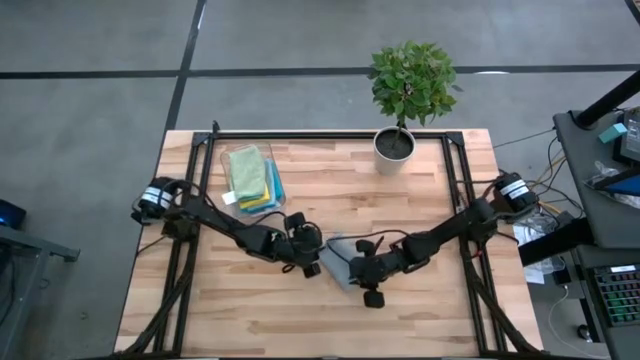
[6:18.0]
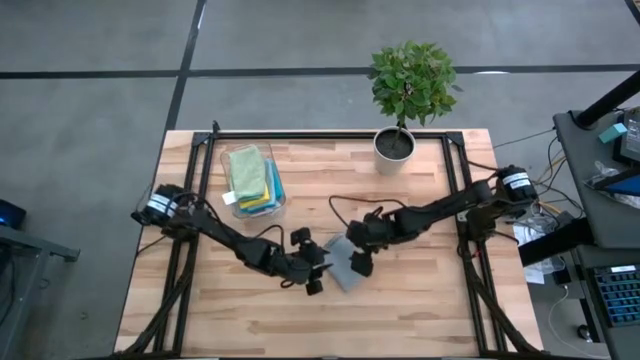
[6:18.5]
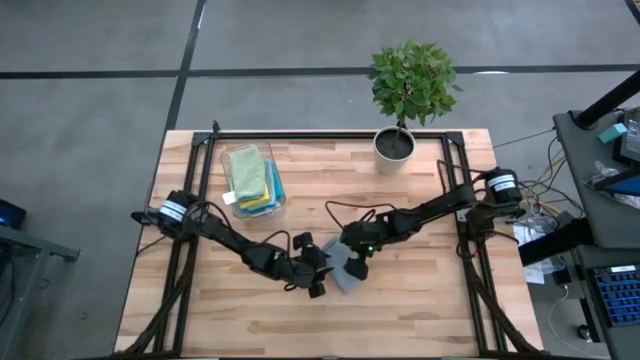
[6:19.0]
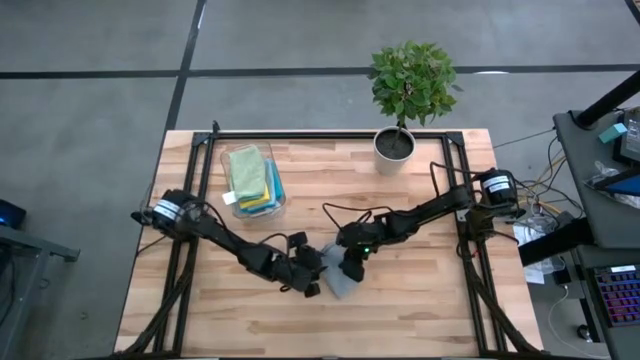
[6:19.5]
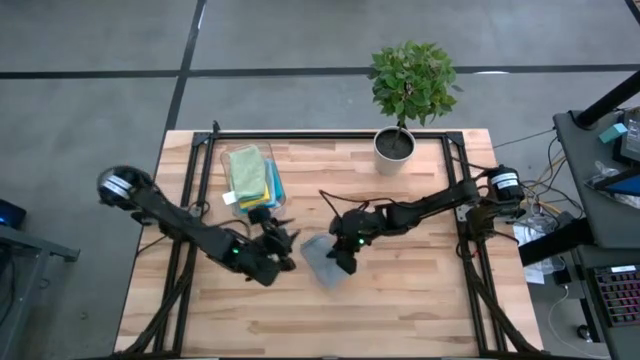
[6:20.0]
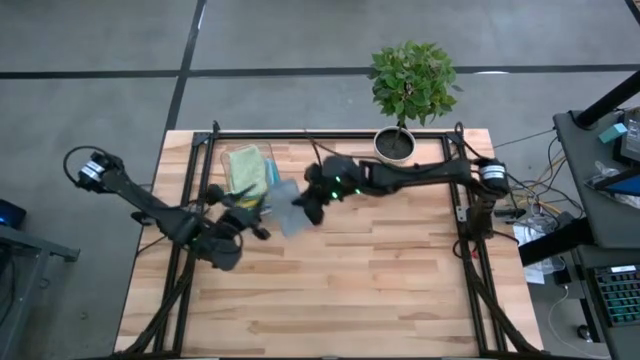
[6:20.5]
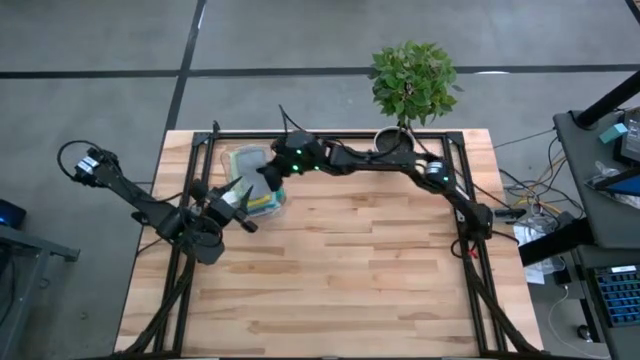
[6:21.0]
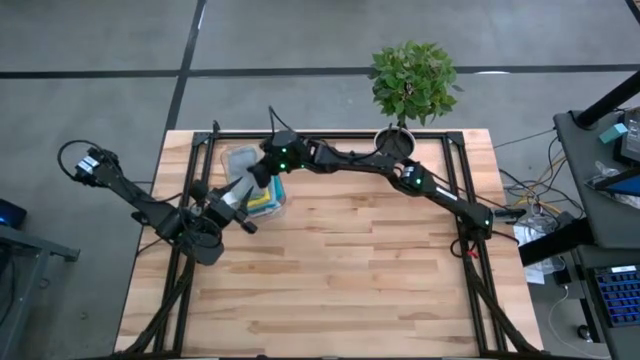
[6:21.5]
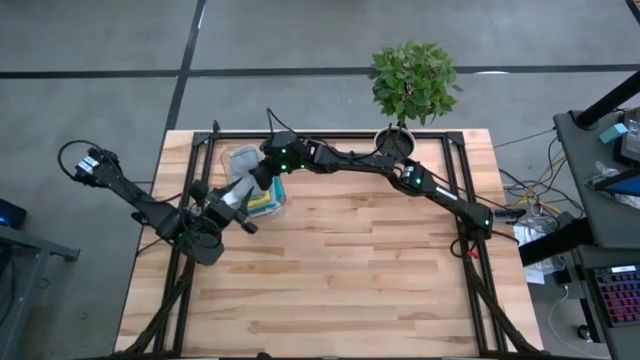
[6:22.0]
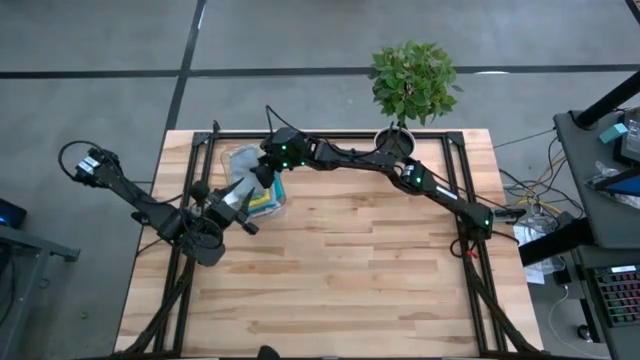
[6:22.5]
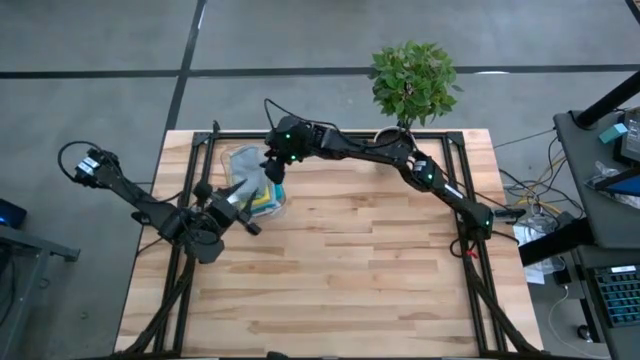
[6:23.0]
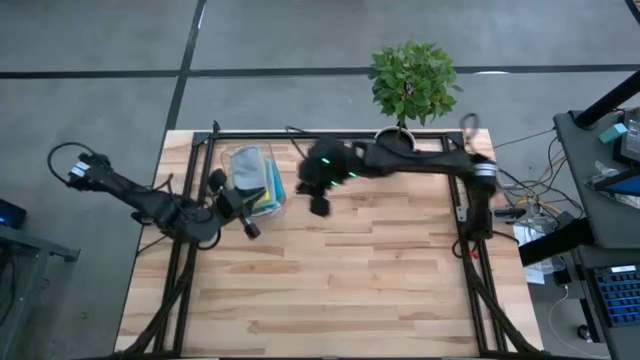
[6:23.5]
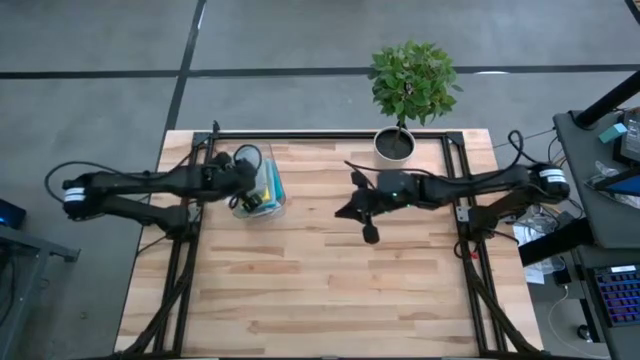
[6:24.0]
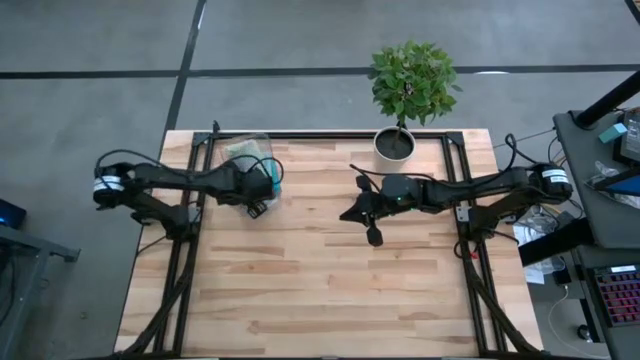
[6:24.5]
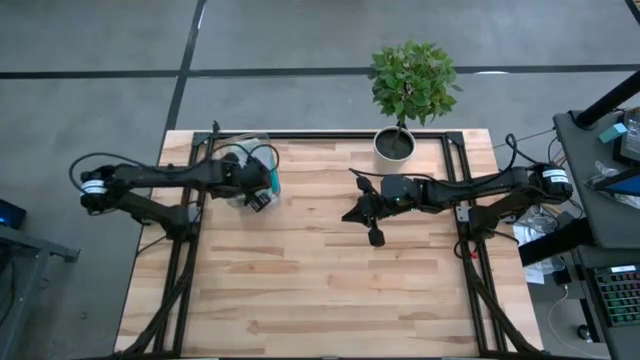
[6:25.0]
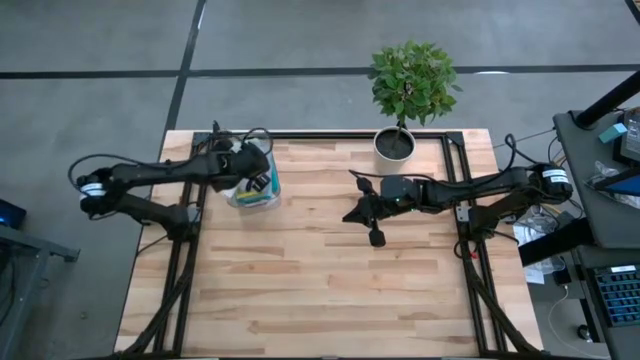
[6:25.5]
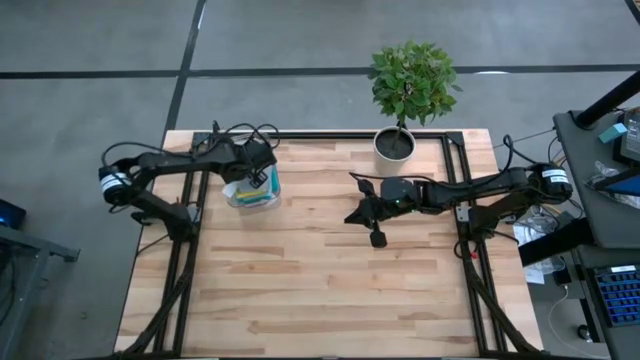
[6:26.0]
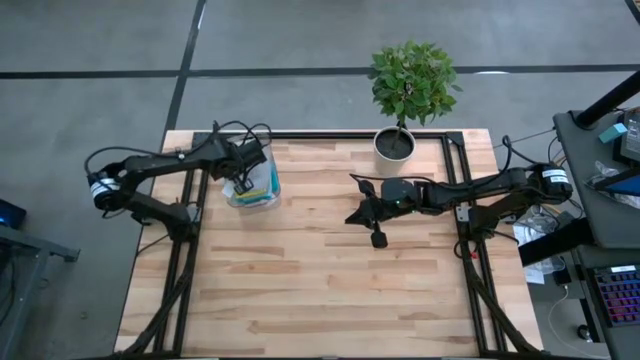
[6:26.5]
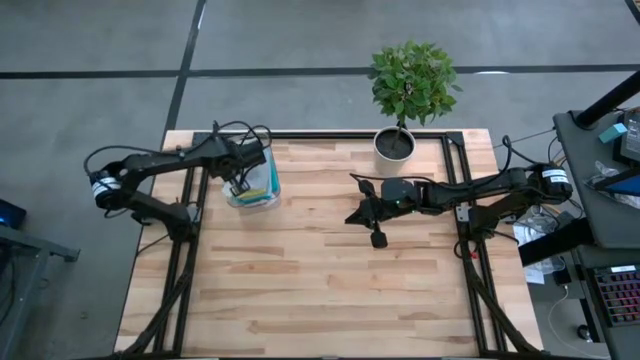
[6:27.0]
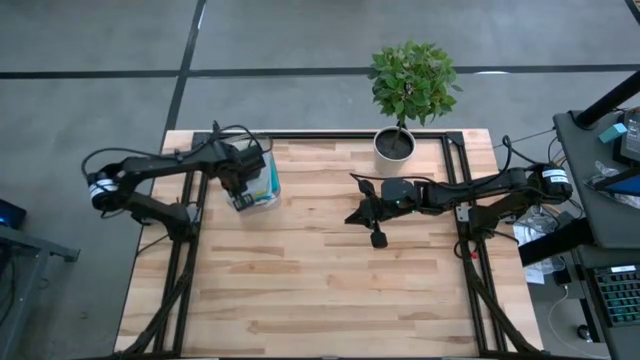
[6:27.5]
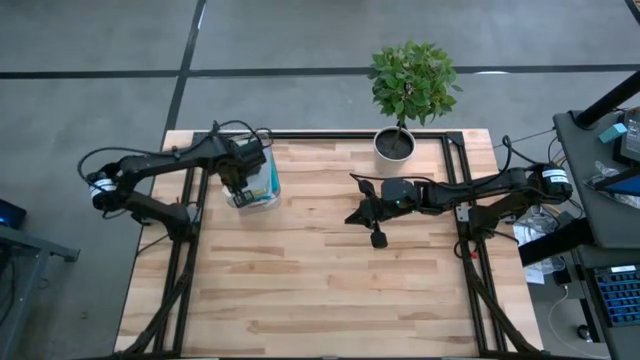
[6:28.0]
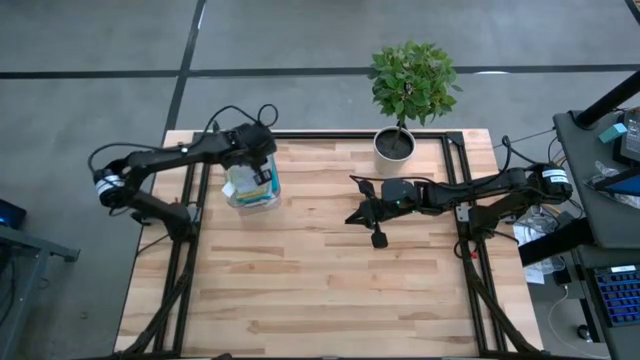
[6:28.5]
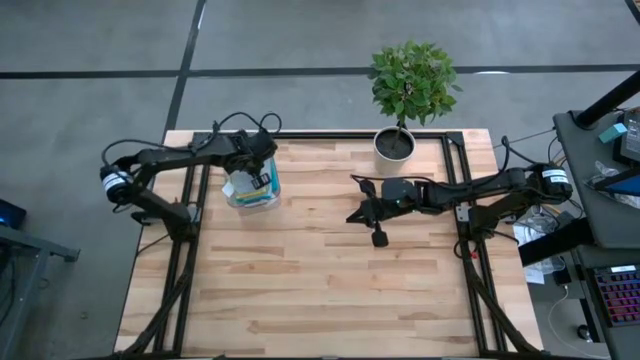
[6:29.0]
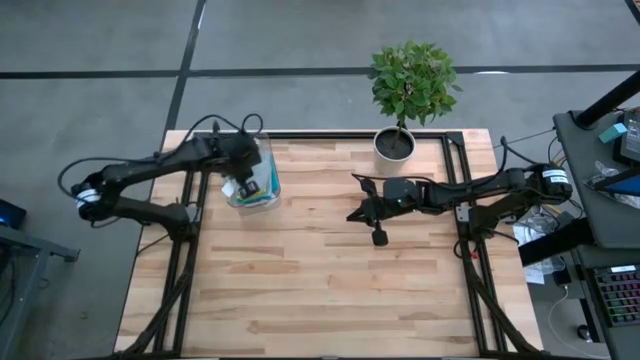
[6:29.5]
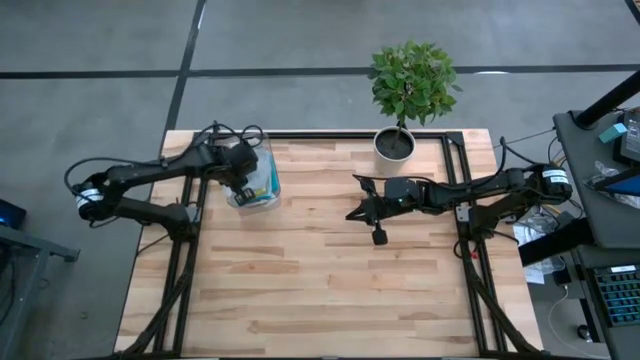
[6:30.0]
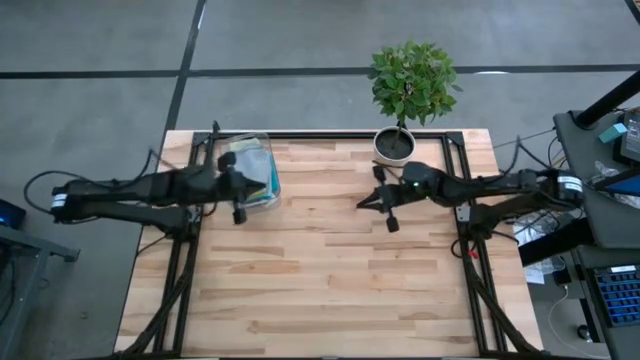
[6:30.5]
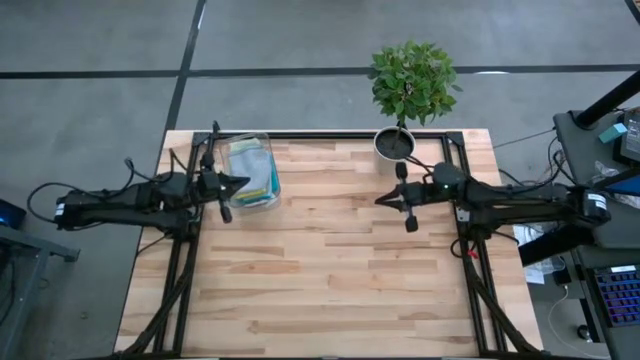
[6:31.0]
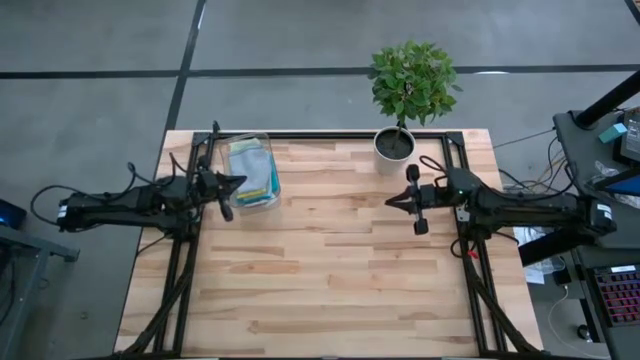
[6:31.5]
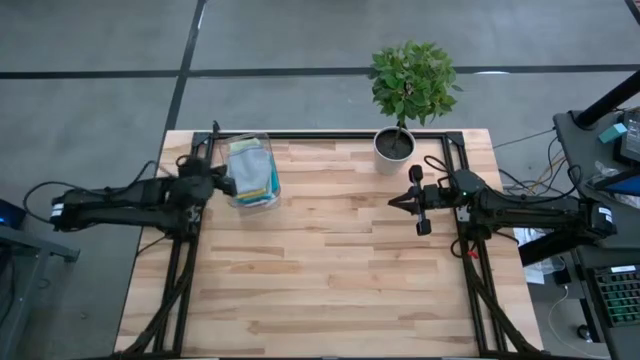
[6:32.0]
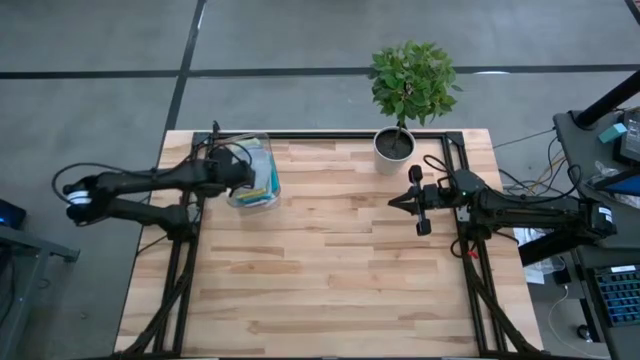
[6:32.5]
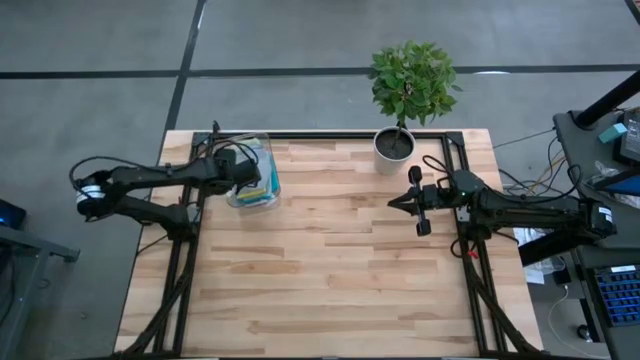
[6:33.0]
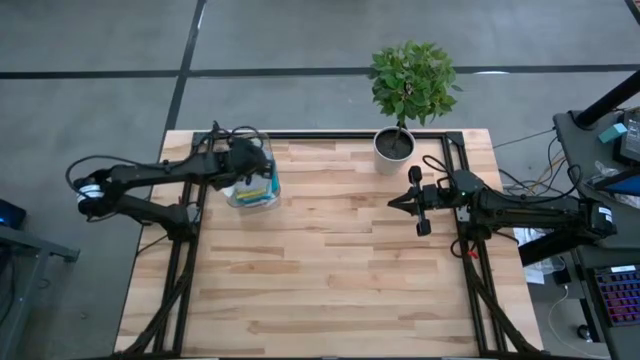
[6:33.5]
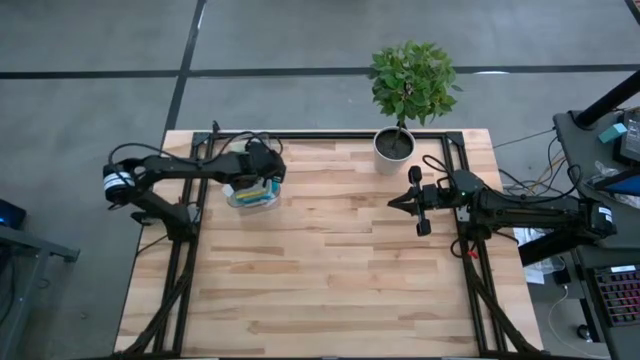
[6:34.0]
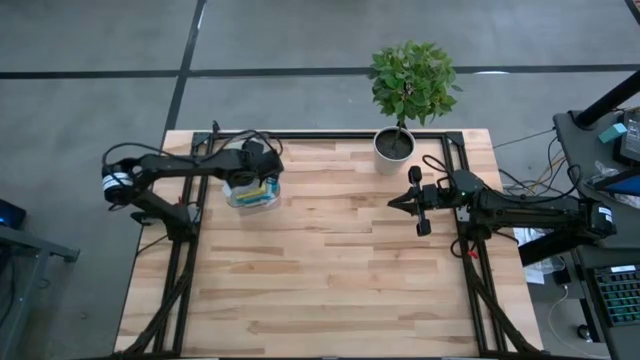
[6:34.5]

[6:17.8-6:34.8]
Task: Fold microfiber towels
Stack the folded gray microfiber towel on top of the light green microfiber towel on the bin

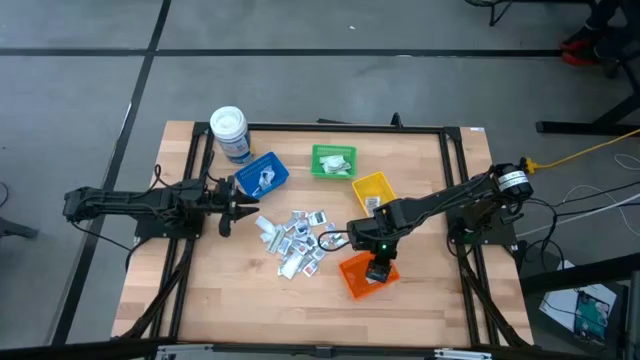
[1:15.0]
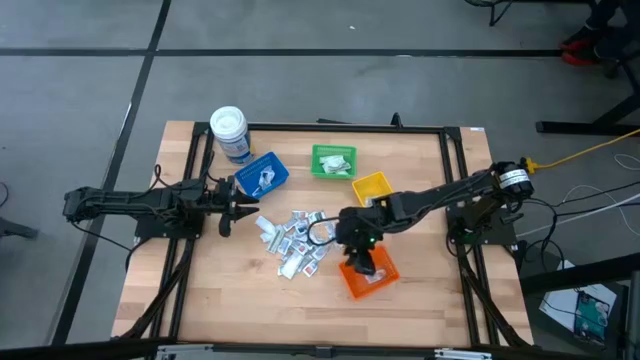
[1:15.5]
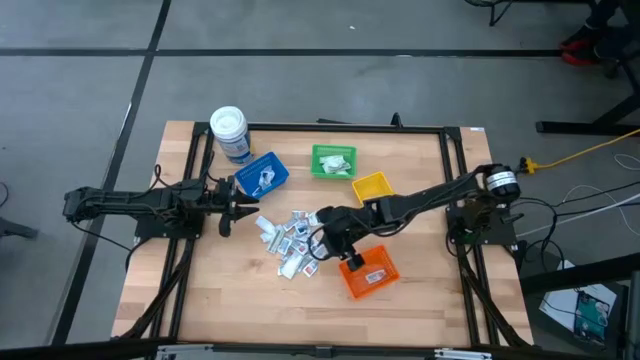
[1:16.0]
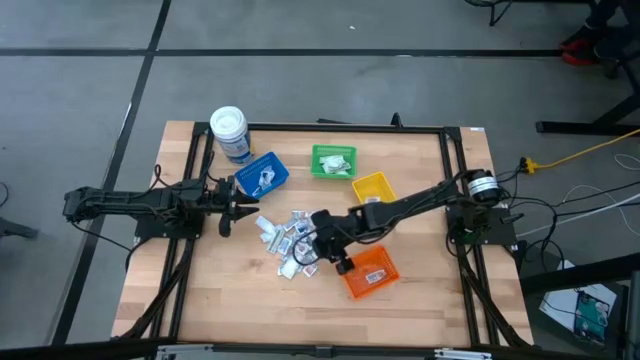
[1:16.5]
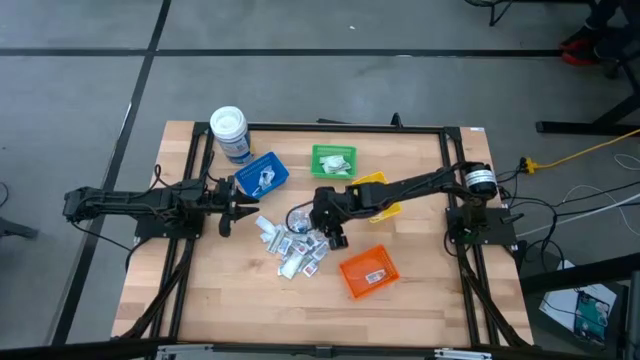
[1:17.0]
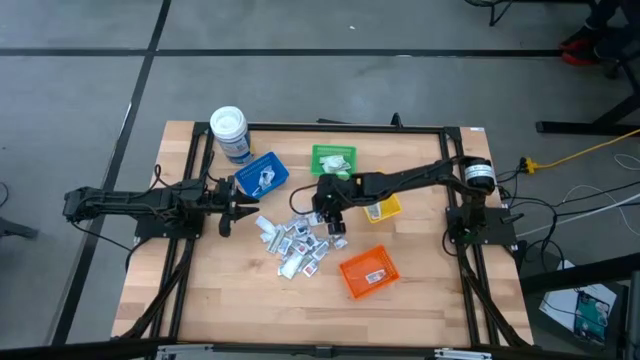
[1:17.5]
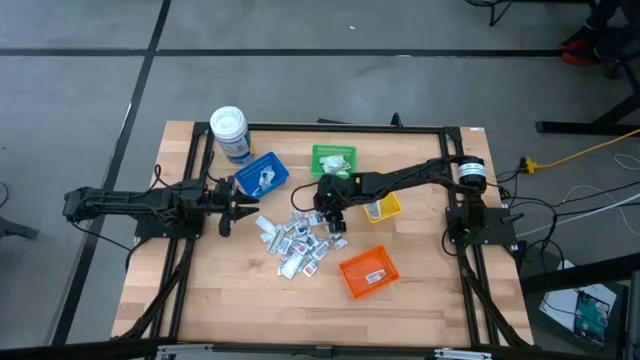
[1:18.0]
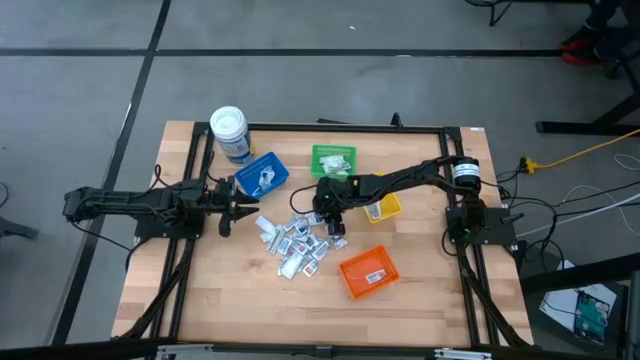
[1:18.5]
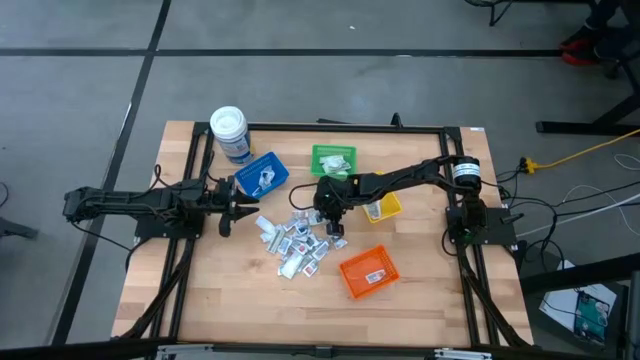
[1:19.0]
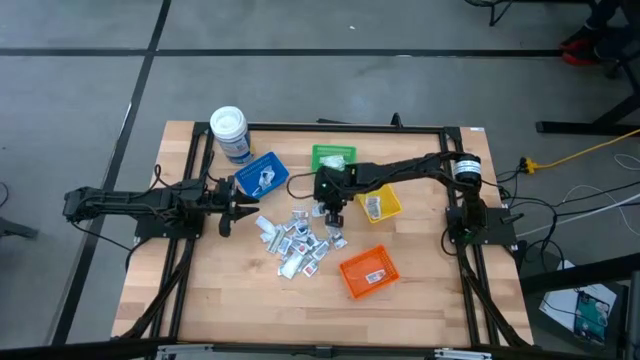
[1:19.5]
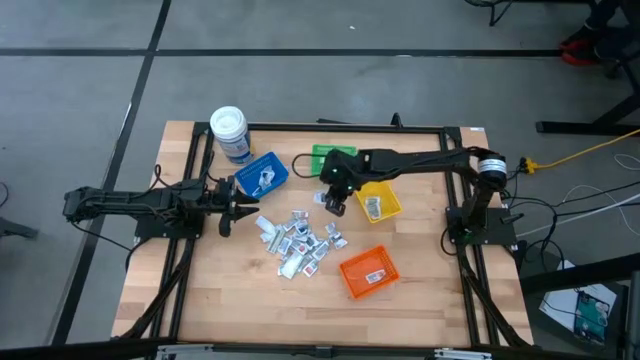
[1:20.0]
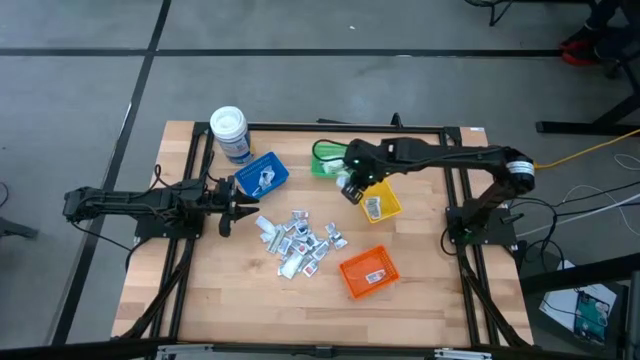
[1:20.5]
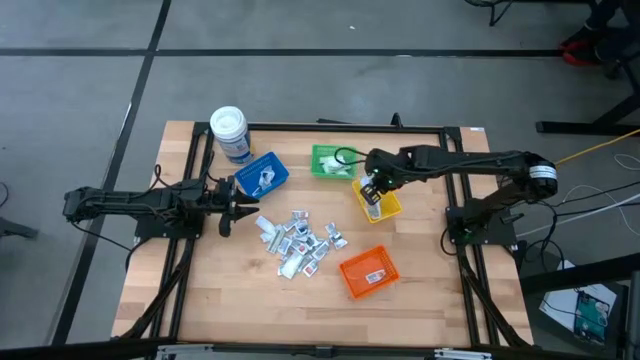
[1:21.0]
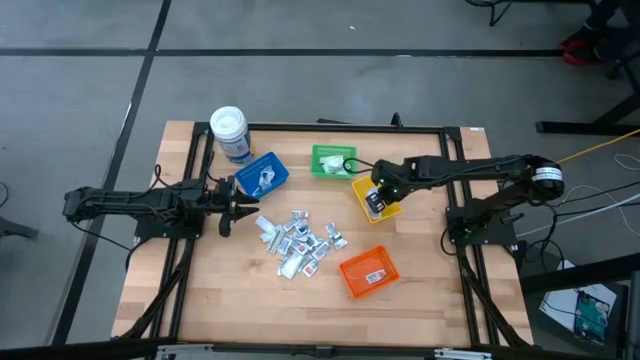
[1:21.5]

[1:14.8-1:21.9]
Task: Pick & Place First Aid Supplies
Put the white towelette pack into the yellow bin
